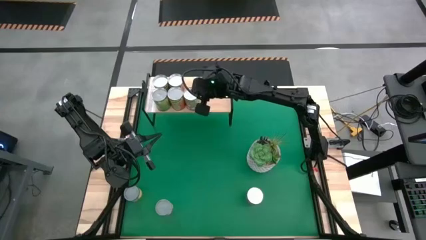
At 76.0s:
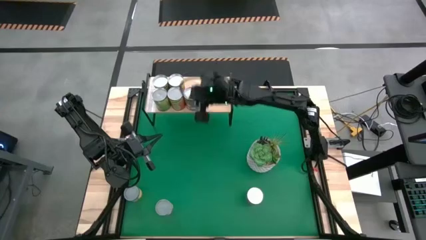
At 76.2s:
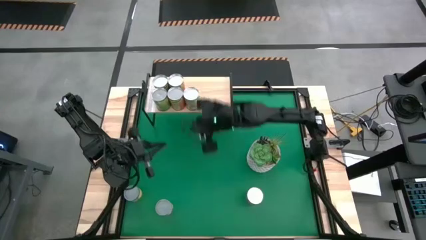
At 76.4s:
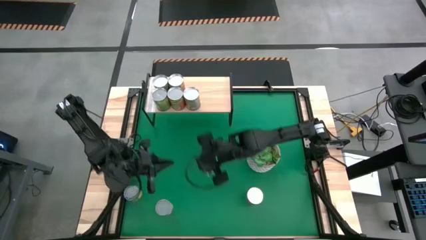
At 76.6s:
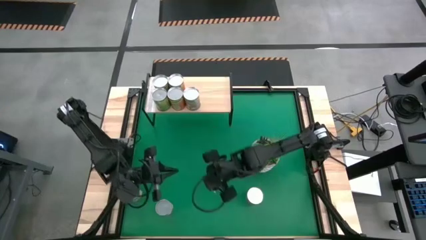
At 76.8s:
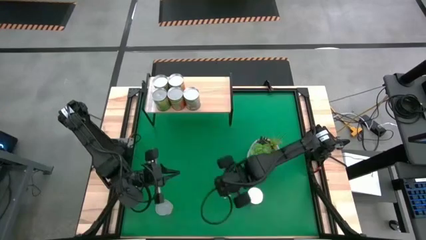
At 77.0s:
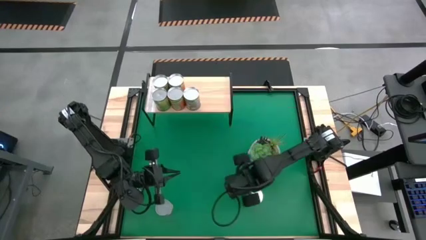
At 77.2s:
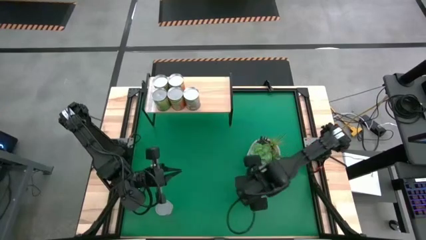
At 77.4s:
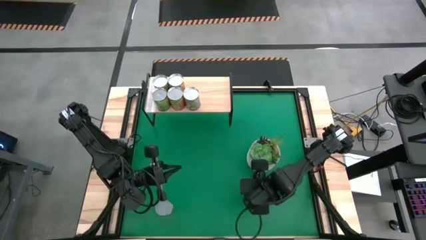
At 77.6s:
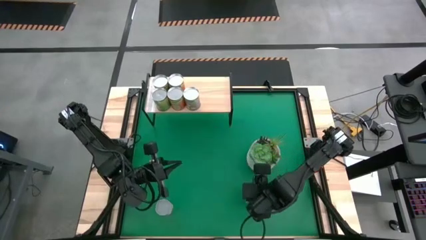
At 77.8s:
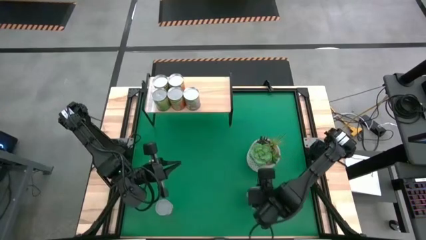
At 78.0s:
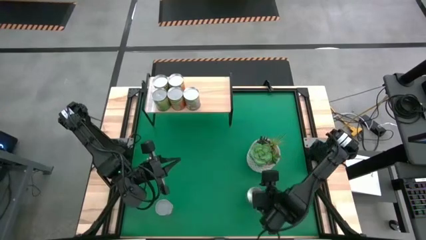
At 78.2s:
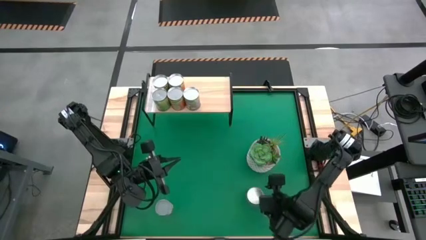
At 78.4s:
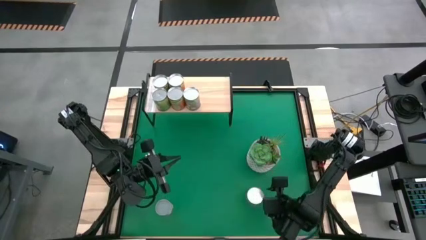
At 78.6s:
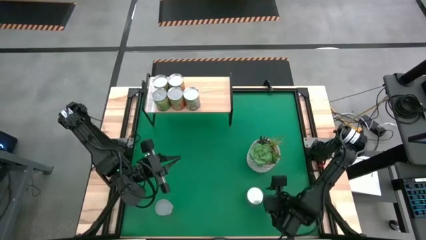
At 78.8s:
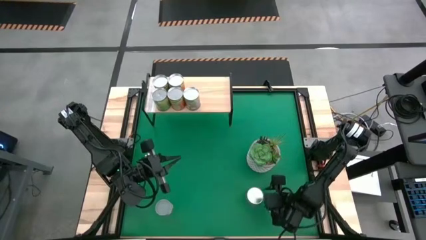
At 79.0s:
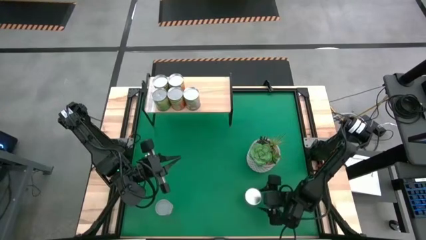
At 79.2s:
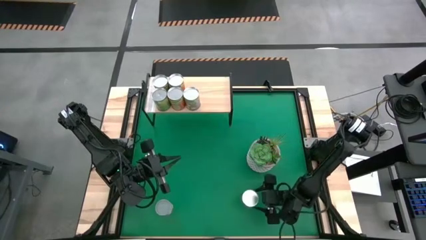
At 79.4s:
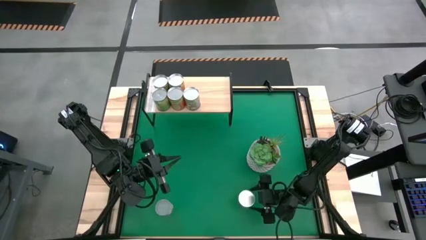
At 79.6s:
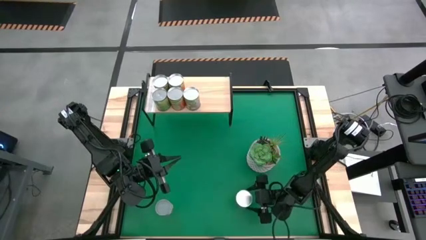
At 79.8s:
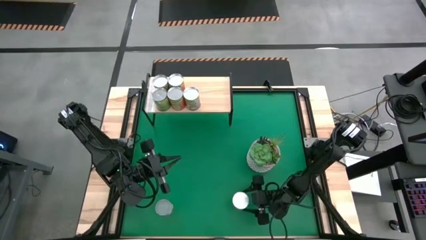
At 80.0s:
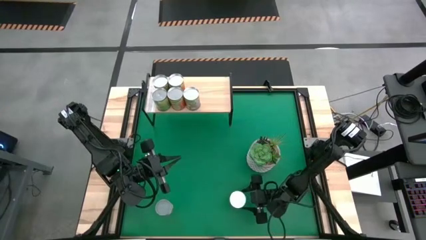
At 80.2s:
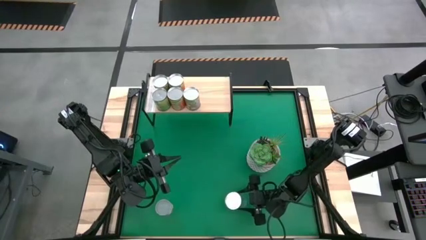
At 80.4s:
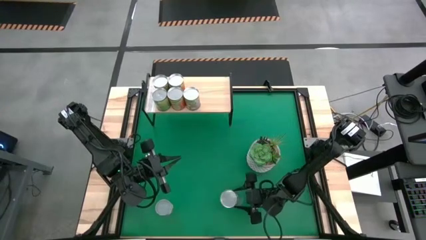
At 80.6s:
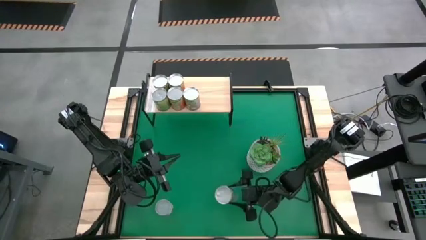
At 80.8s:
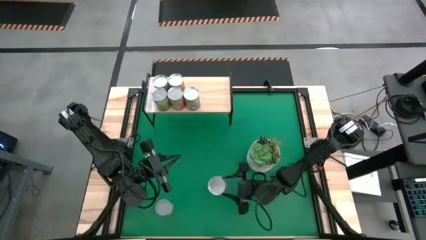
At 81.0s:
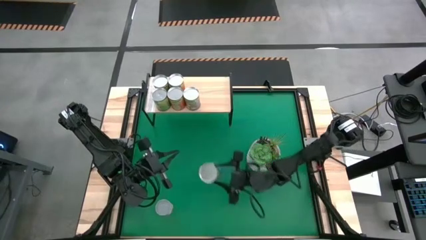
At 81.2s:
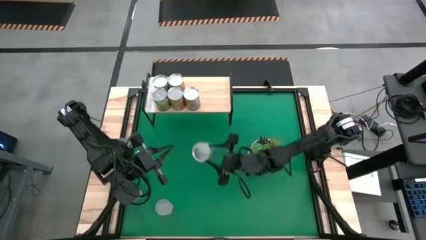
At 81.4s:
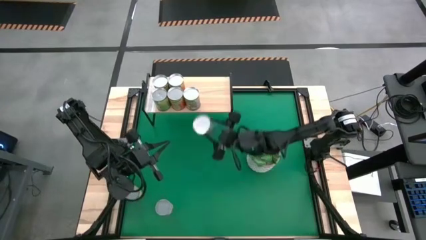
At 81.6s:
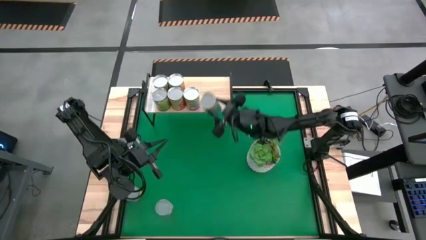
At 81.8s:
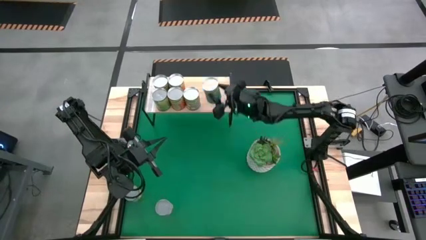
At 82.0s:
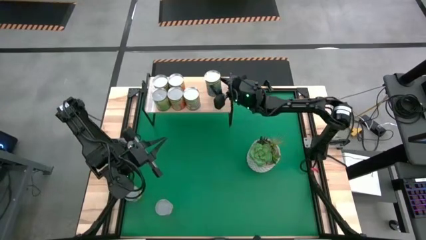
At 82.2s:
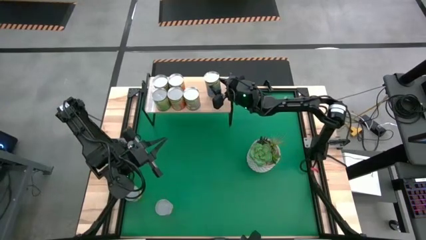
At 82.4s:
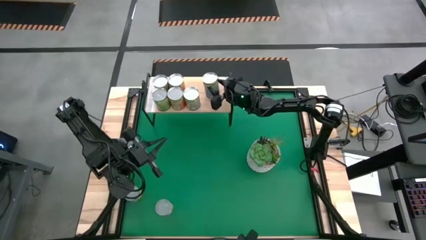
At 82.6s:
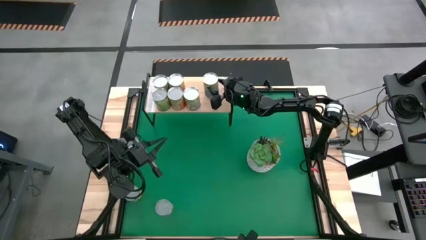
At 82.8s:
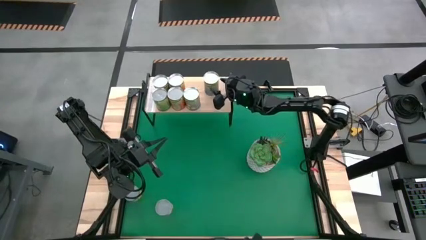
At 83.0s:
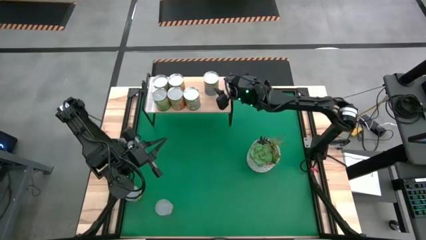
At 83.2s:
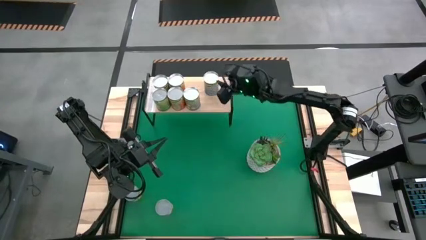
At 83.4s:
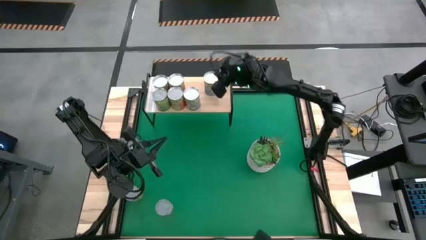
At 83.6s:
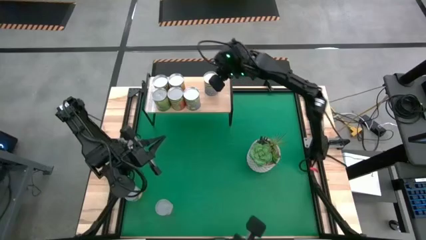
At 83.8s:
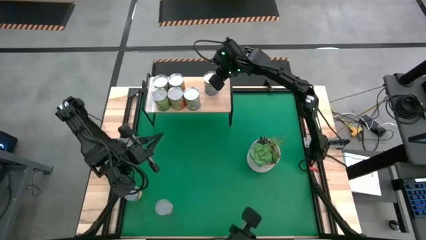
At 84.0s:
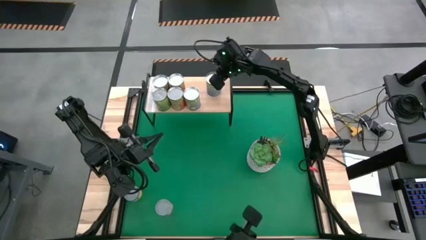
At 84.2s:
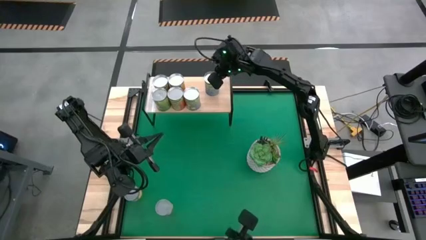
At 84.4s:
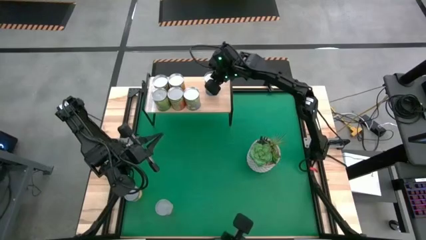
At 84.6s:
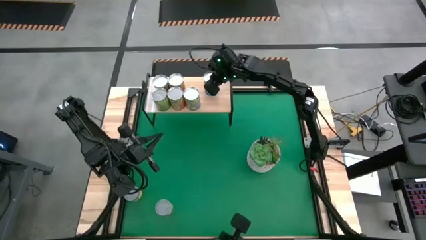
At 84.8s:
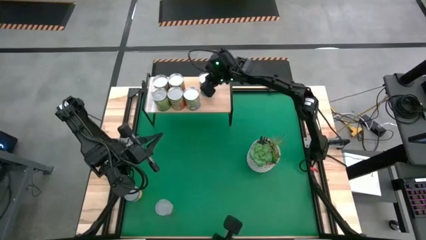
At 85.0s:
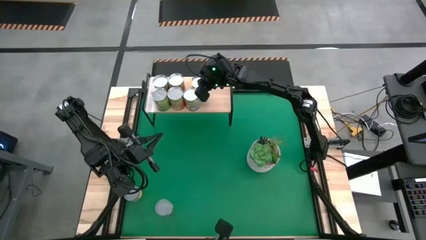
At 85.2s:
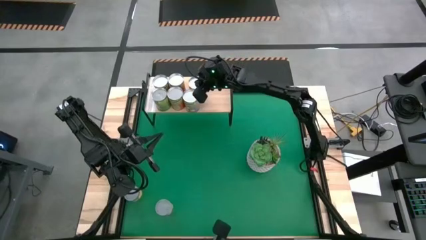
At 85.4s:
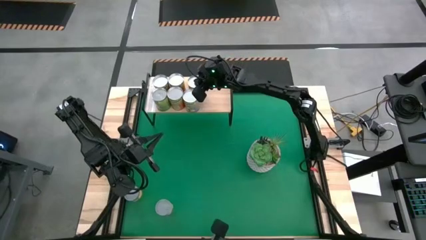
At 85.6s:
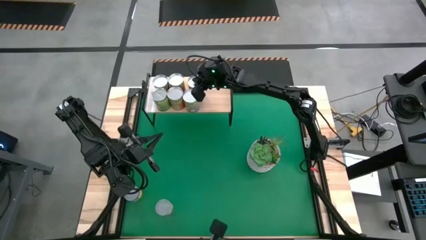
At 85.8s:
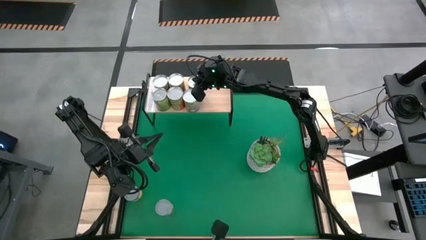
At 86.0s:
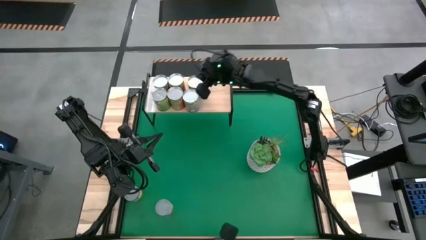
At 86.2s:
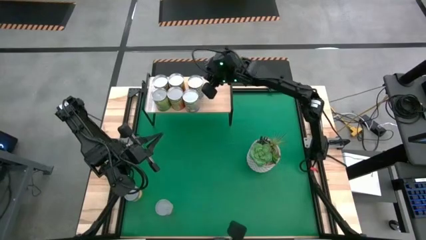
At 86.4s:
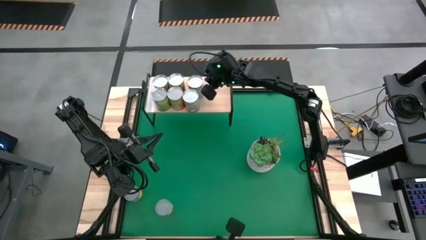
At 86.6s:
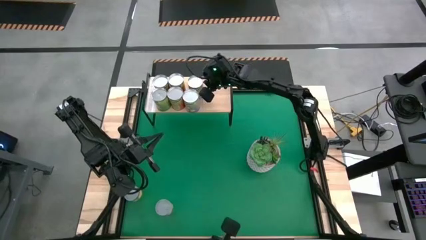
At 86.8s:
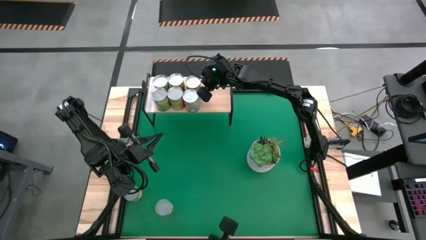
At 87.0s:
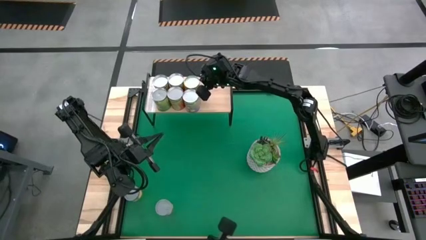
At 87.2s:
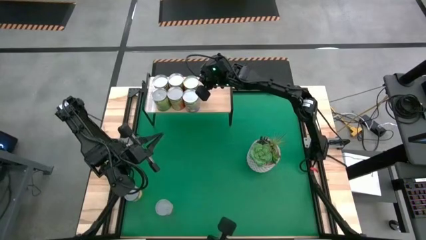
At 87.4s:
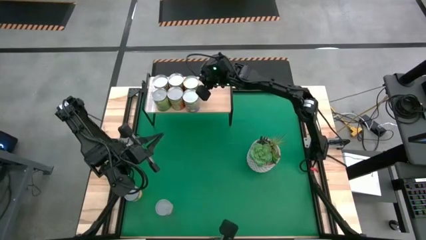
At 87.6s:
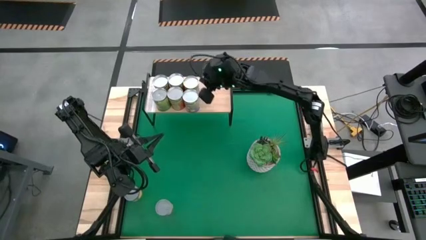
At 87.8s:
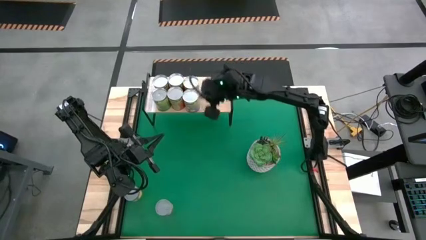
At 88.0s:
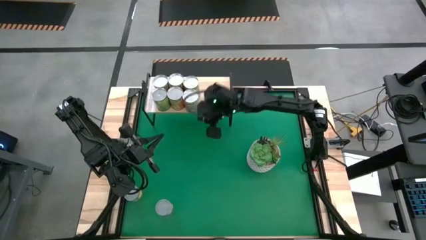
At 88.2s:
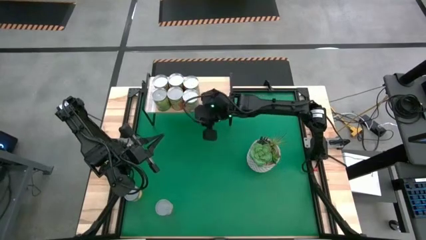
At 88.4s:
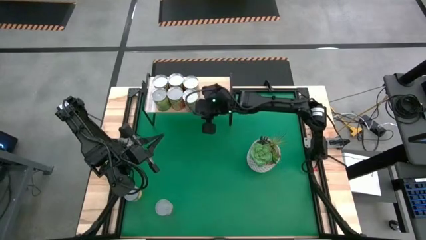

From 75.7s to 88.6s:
Task: Pick and place cans onto a shelf
Put the canned cherries on the shelf

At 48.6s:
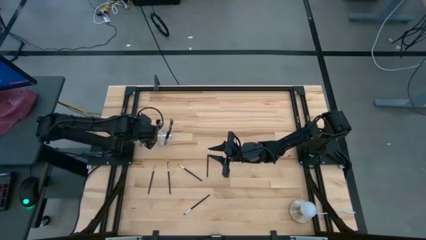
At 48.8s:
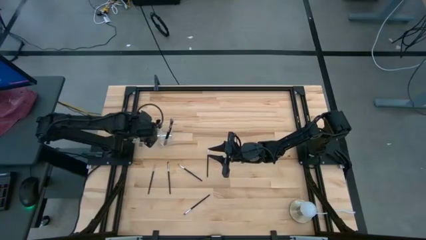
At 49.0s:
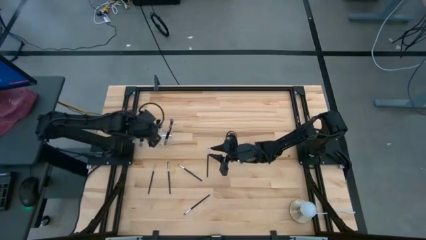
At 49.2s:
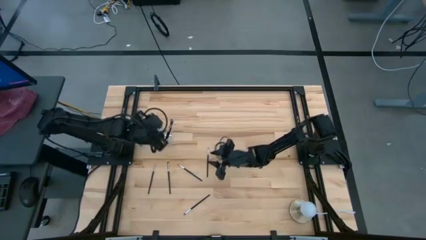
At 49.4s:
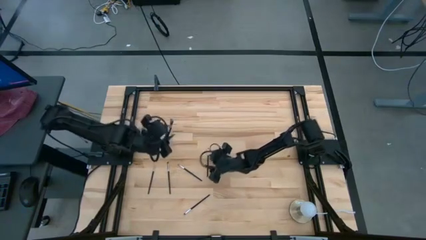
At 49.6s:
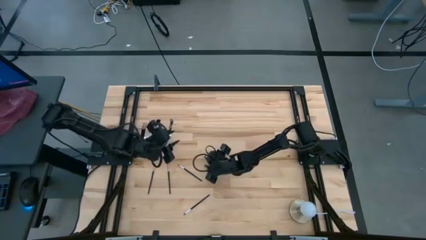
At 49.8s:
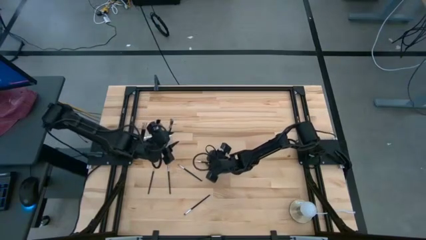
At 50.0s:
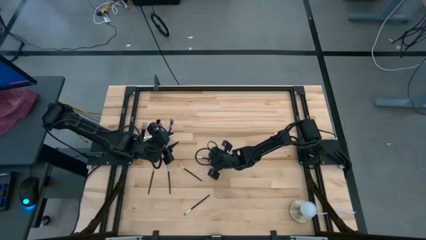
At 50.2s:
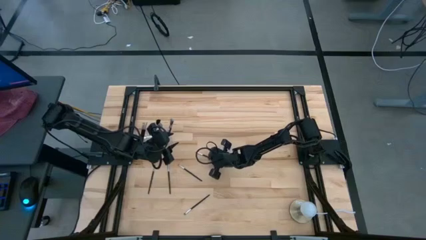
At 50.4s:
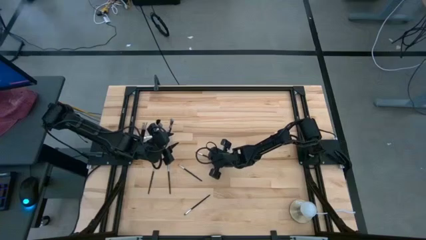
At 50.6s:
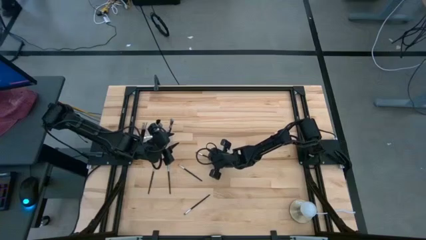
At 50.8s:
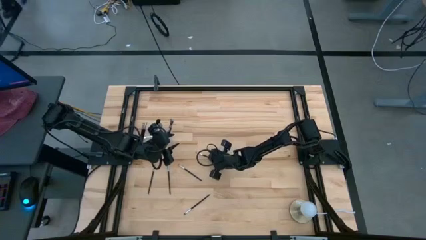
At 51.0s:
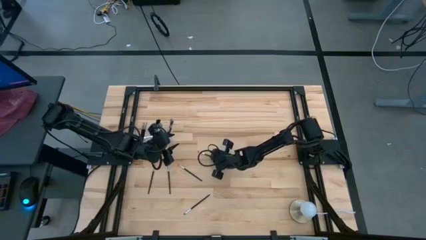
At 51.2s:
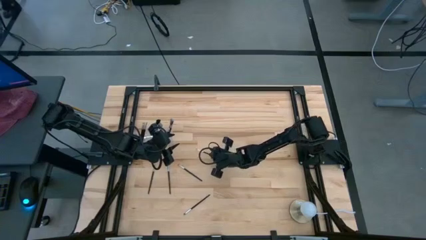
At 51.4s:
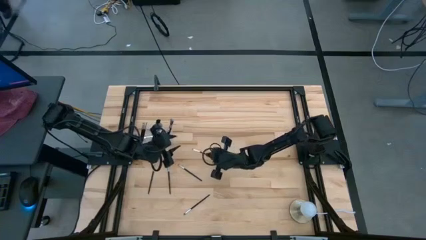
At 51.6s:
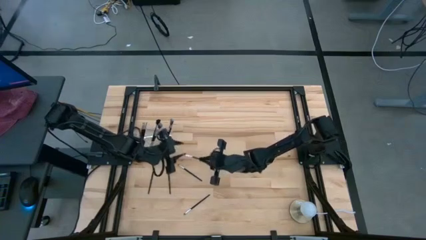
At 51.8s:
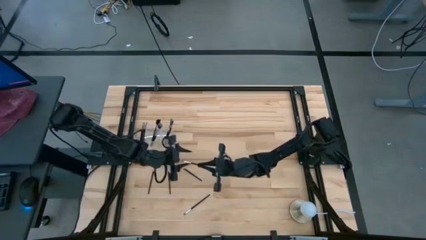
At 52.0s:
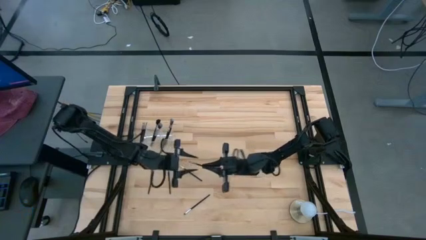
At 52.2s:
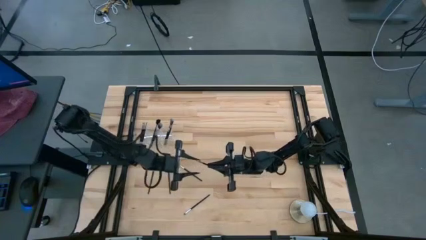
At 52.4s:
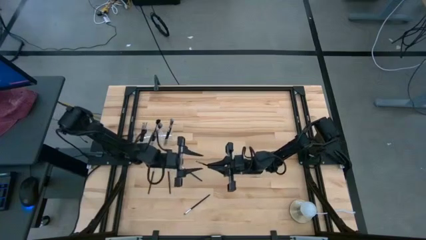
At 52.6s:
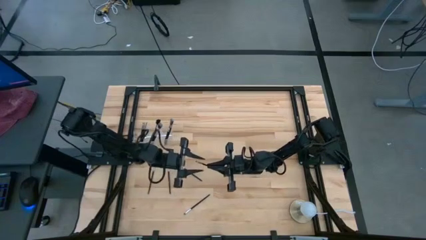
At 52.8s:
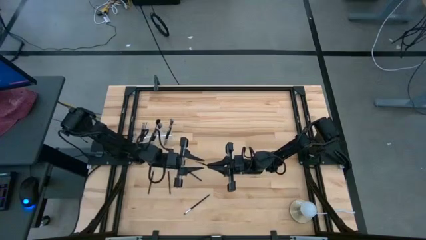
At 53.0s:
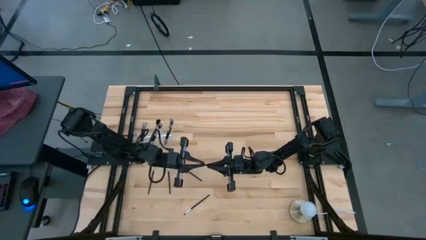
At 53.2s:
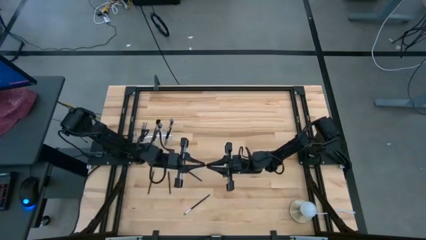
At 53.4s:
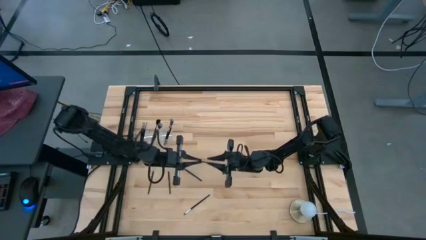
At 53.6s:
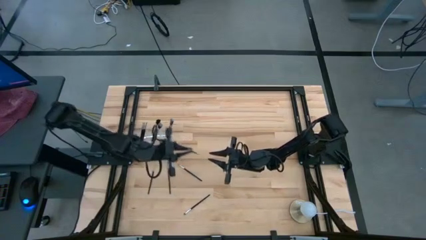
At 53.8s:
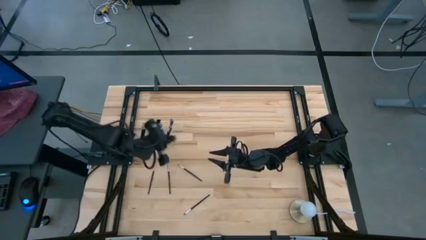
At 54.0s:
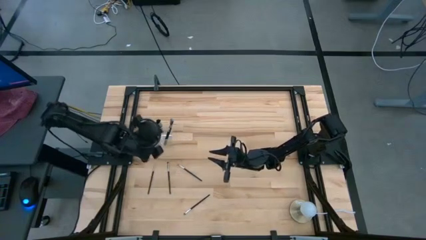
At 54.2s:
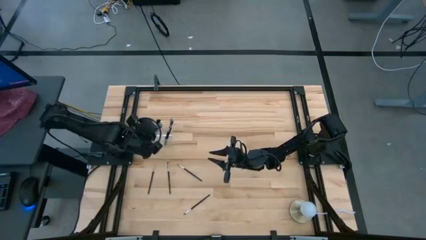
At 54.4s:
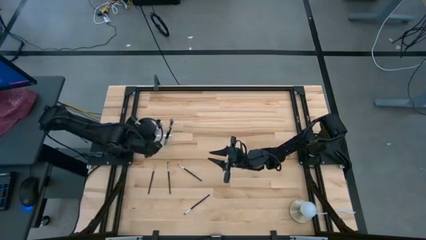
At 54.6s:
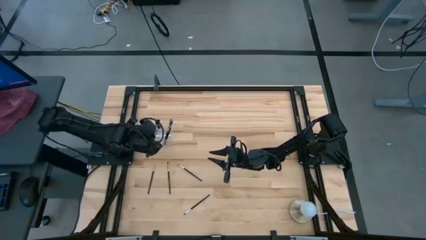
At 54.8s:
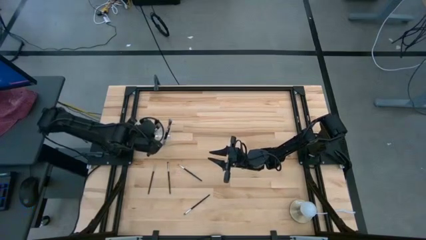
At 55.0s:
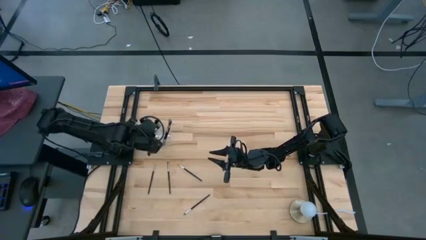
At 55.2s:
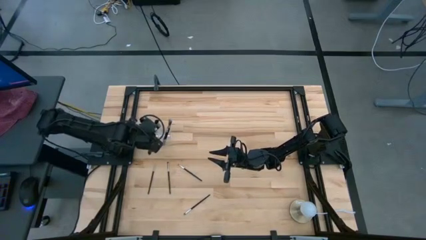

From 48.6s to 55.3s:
Task: Put items in baskets/containers
Put the black eyeshadow brush into the transparent organizer
